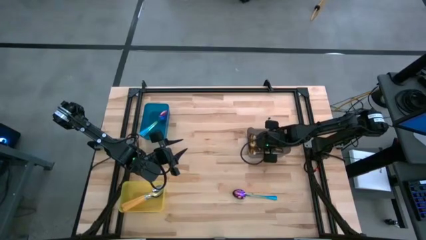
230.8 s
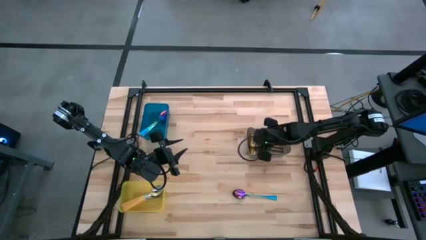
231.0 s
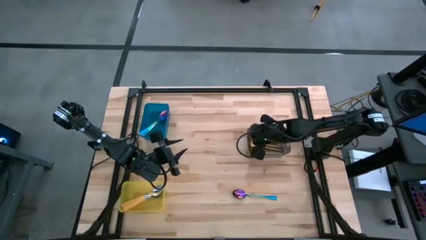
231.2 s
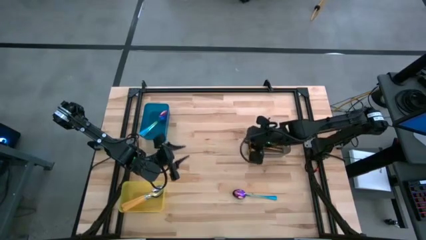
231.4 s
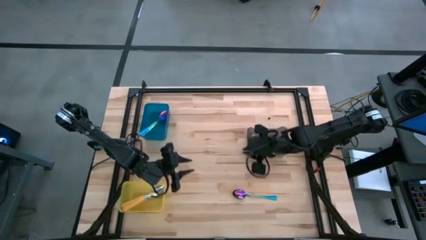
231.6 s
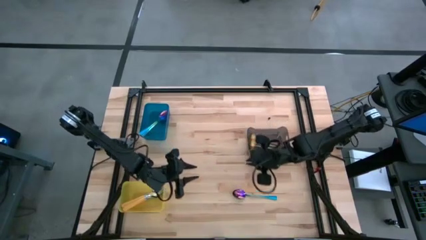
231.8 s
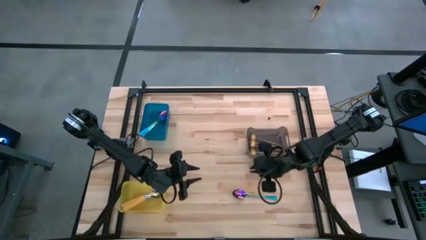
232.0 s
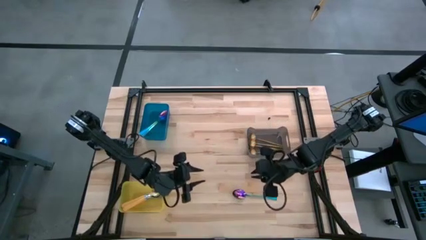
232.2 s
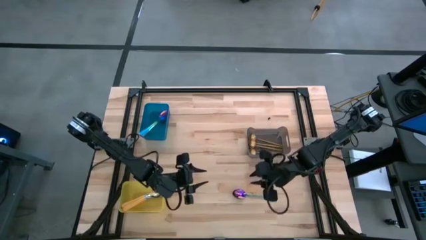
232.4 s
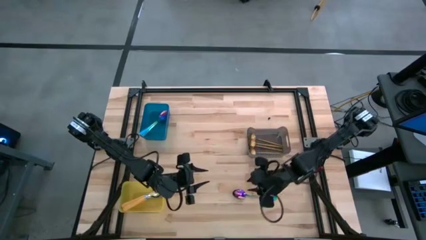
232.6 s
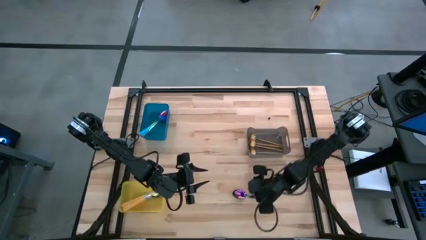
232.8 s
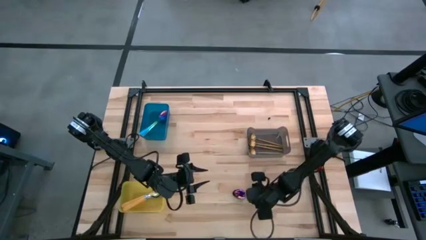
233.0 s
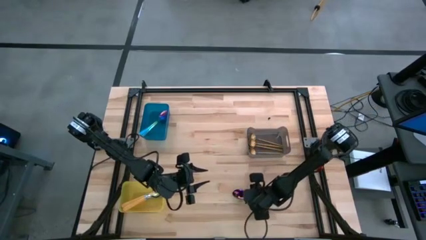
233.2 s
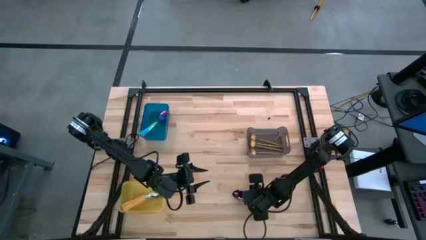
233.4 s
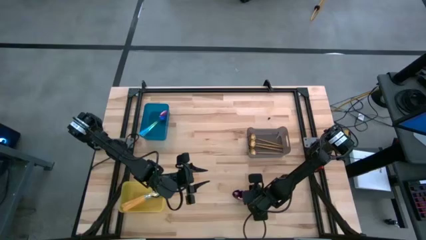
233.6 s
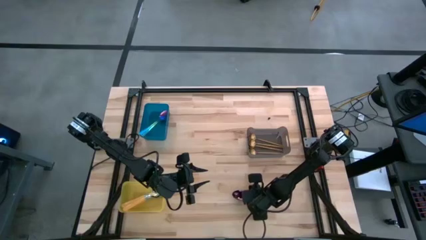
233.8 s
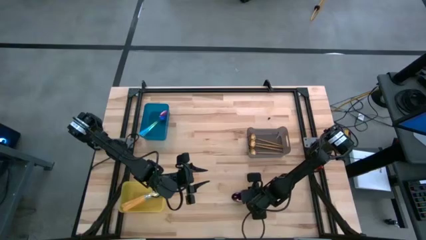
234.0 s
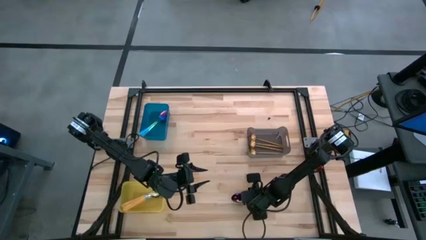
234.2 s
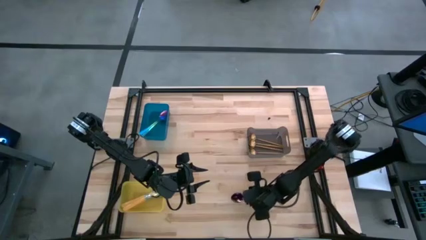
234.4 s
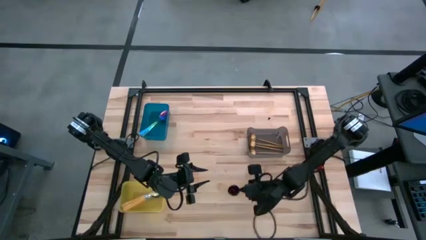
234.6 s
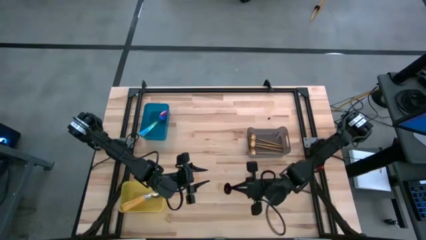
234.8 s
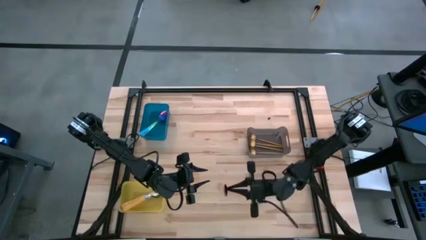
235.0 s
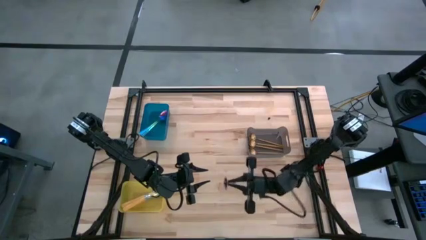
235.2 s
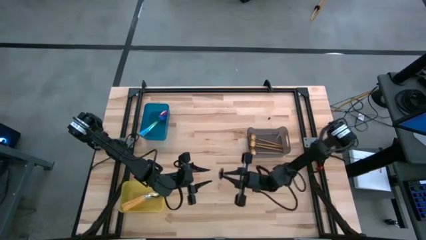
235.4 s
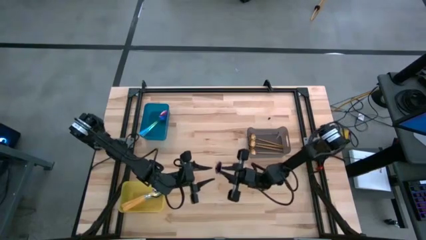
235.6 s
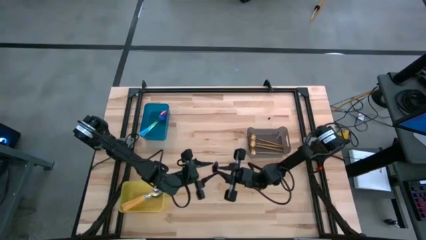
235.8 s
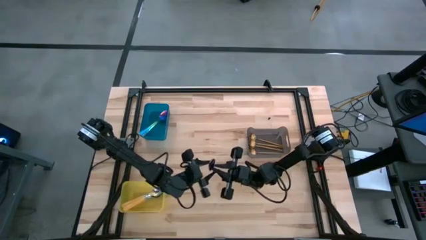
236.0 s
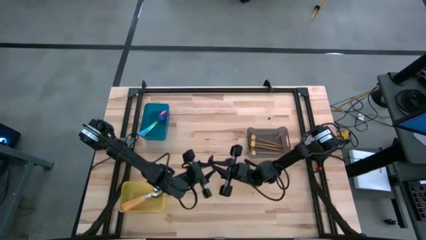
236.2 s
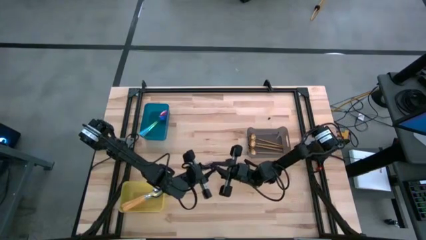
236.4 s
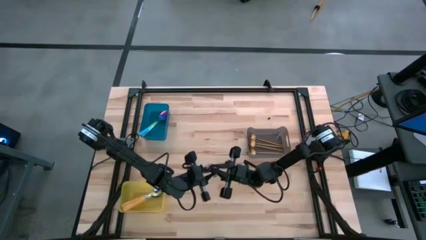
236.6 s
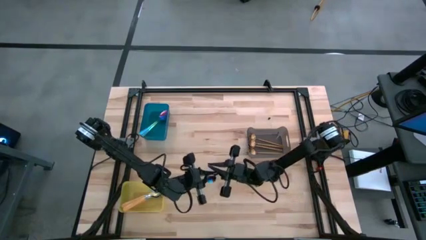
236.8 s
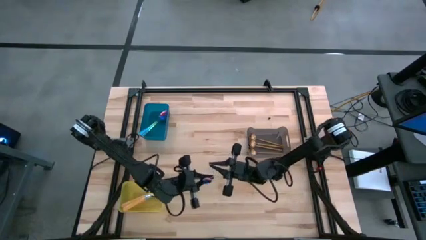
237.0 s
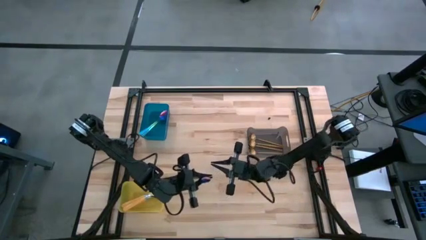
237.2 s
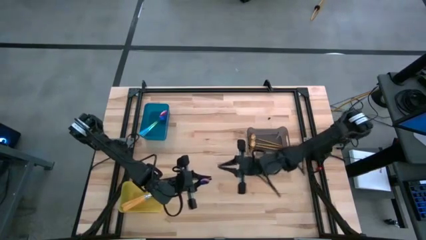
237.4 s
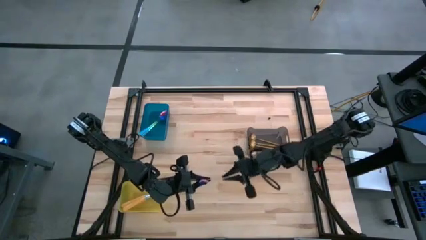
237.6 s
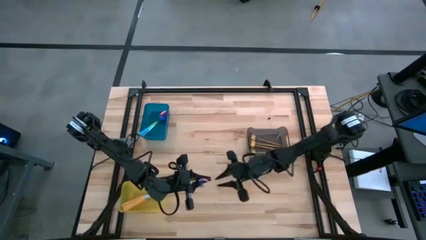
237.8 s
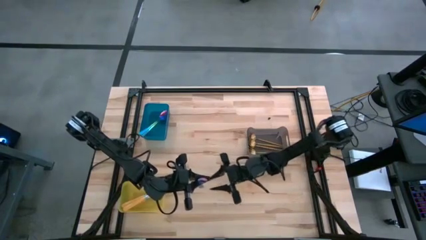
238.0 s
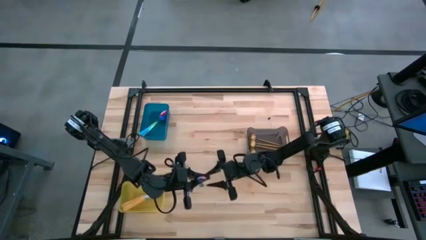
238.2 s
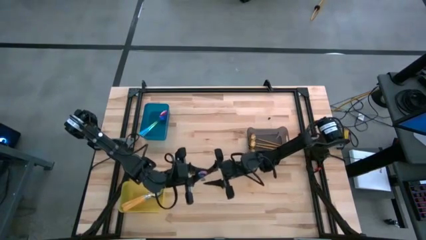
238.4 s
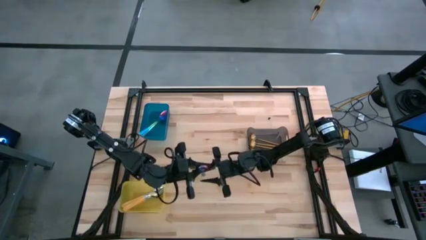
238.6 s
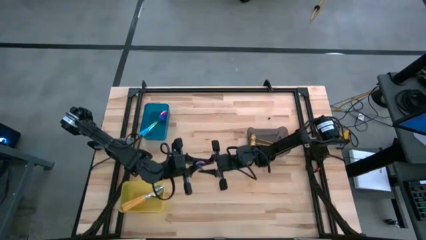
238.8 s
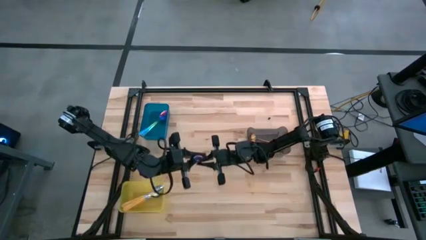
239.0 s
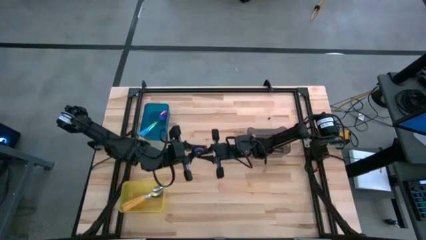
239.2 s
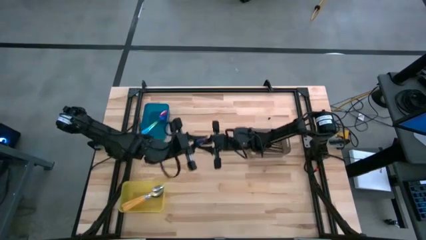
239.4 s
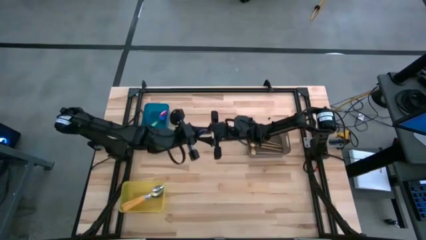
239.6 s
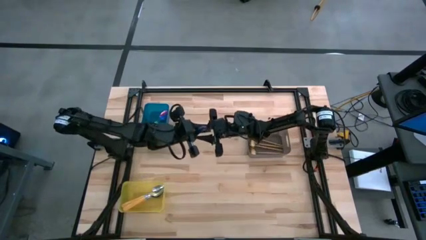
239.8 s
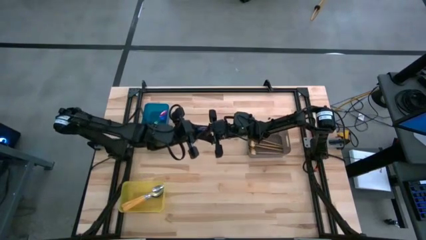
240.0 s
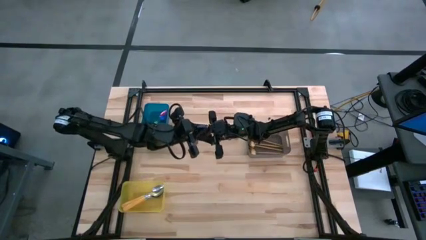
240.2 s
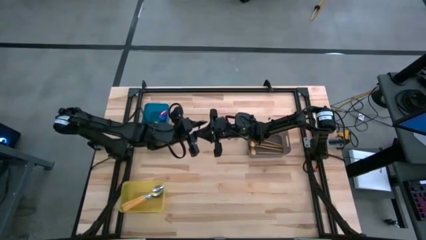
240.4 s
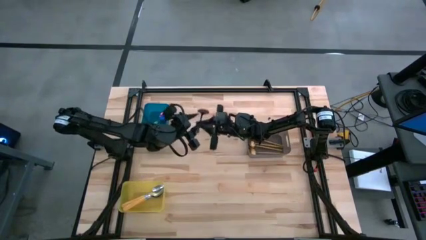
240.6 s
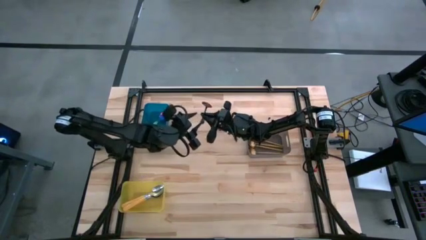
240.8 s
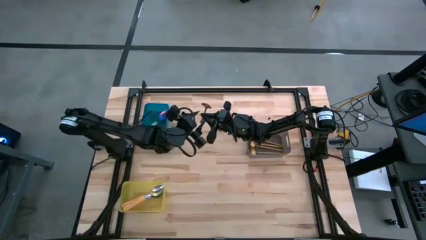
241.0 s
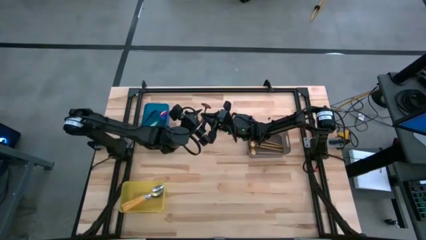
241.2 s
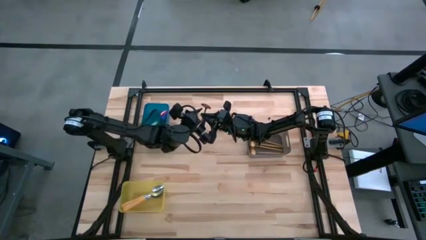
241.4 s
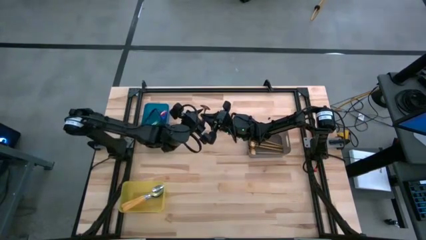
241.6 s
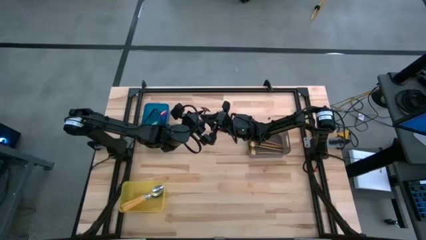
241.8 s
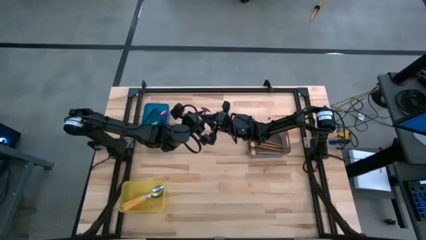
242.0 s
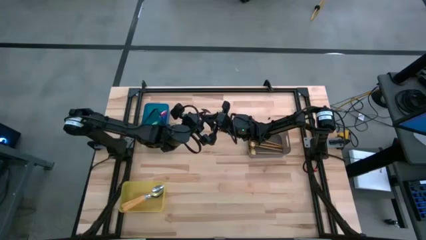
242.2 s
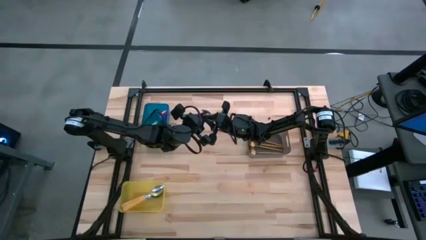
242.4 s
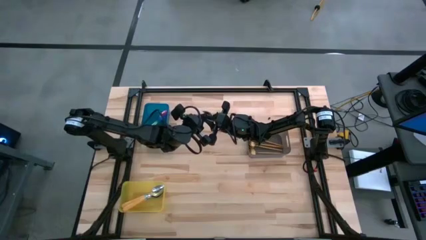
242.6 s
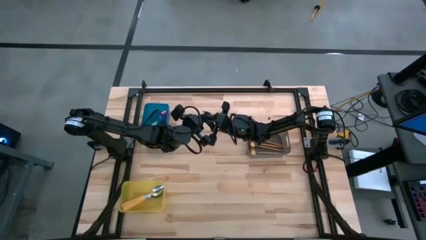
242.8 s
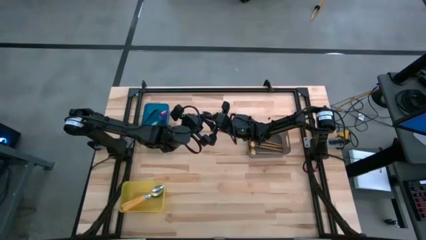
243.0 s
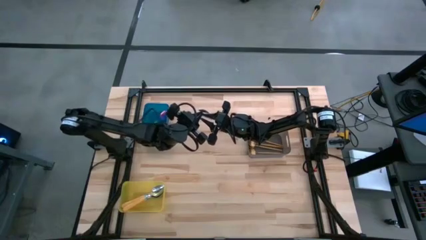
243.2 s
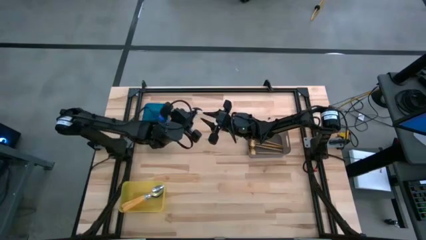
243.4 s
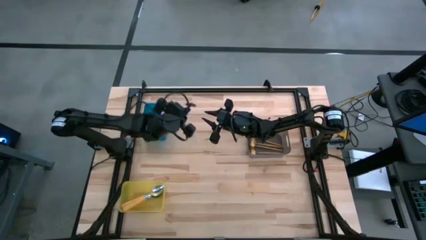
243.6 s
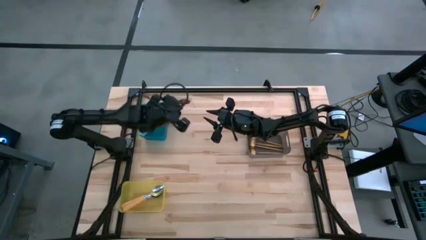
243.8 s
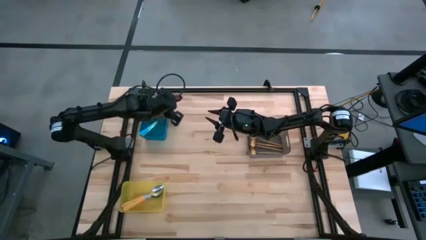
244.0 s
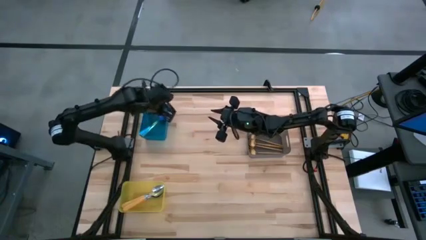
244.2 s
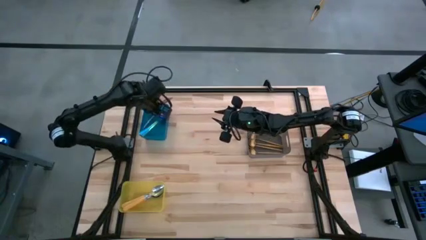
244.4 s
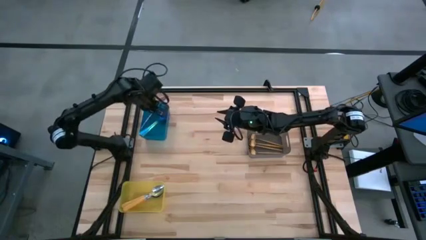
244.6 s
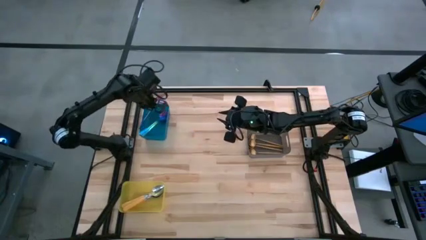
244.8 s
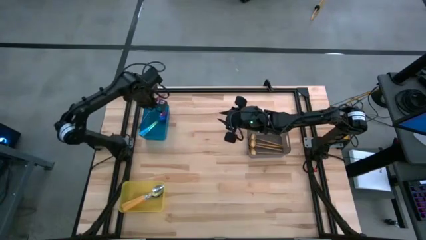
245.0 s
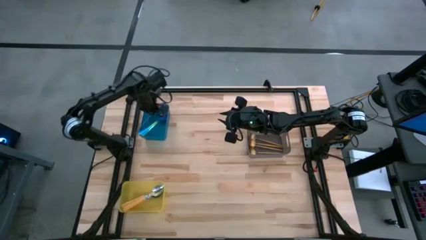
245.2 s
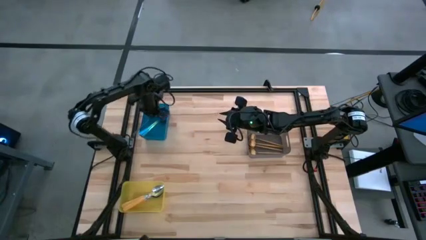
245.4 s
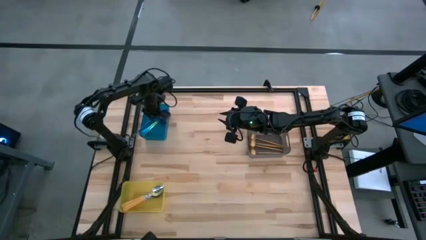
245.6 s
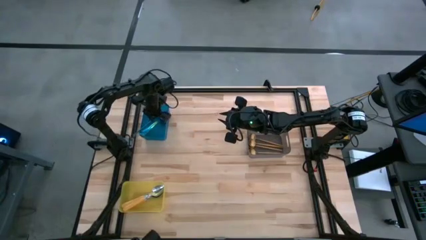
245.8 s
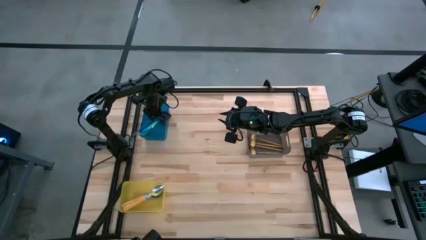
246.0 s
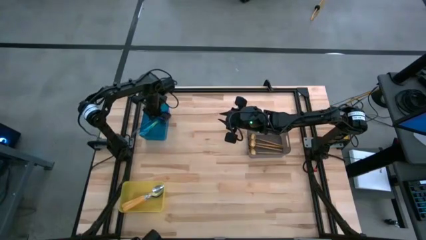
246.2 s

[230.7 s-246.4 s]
Task: Sort silverware by color (type)
Put the blue spoon into the blue bin
